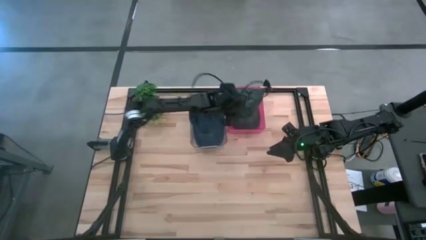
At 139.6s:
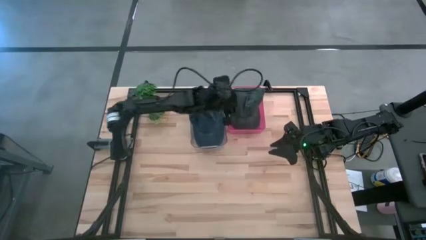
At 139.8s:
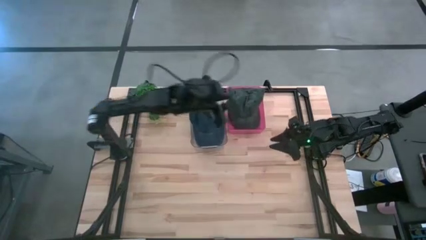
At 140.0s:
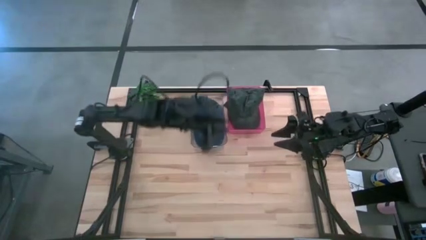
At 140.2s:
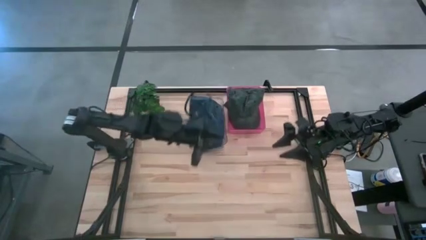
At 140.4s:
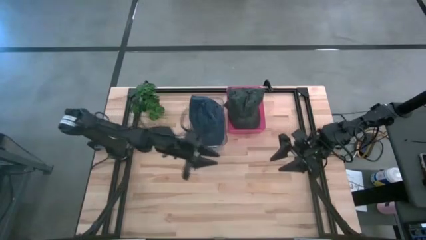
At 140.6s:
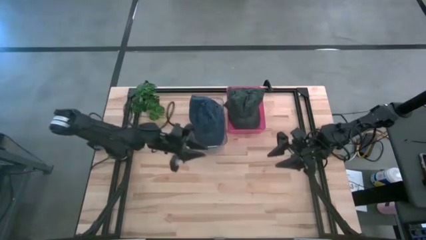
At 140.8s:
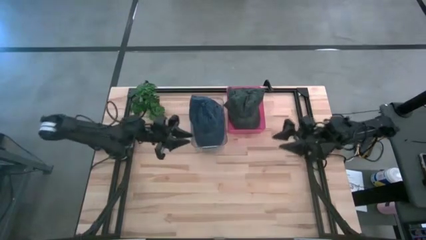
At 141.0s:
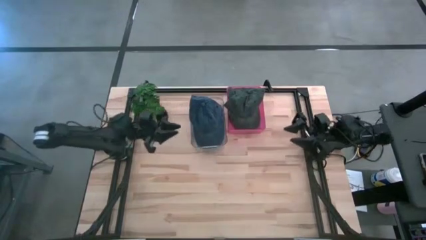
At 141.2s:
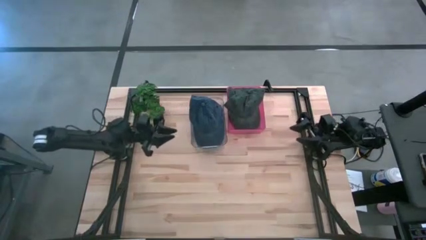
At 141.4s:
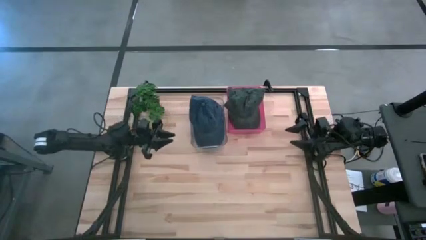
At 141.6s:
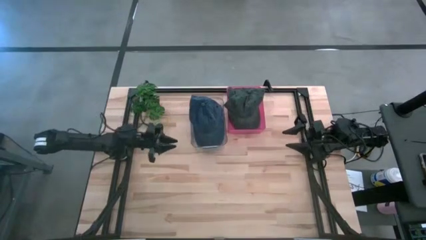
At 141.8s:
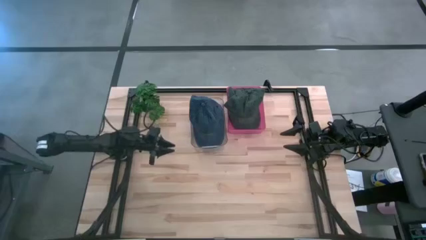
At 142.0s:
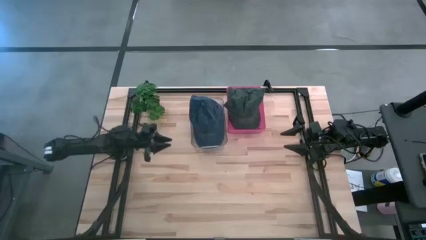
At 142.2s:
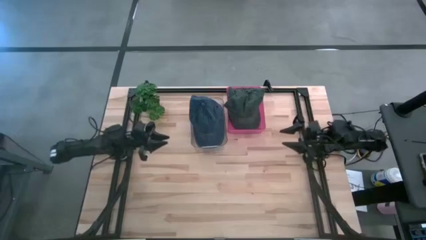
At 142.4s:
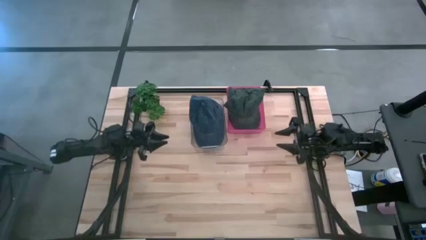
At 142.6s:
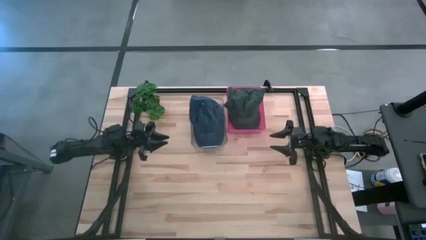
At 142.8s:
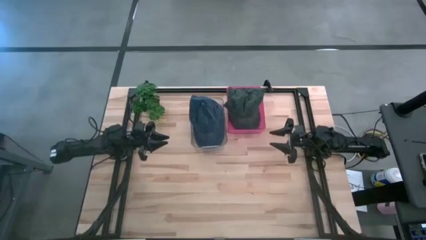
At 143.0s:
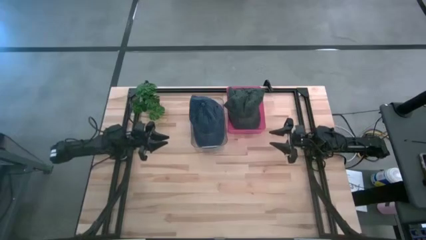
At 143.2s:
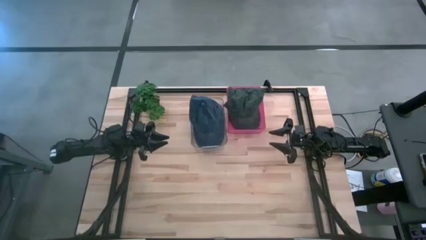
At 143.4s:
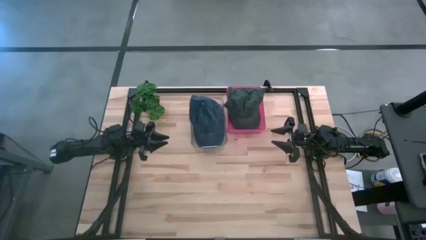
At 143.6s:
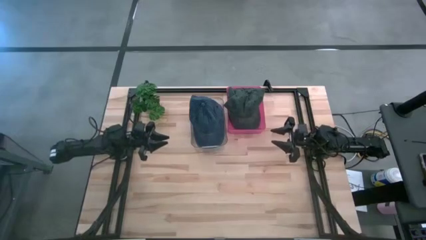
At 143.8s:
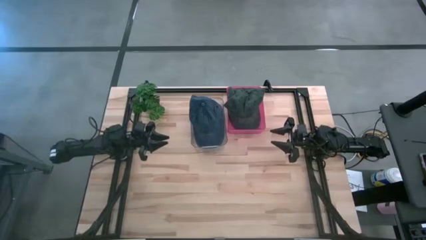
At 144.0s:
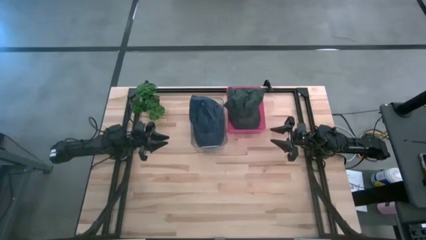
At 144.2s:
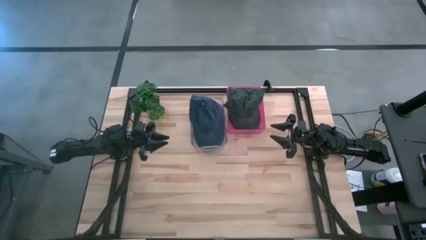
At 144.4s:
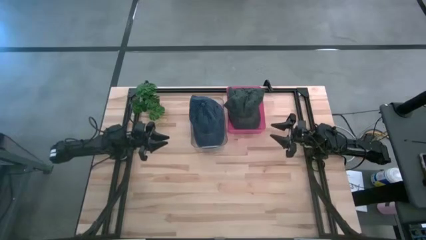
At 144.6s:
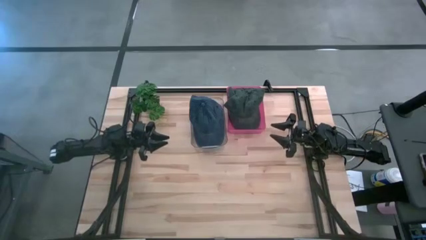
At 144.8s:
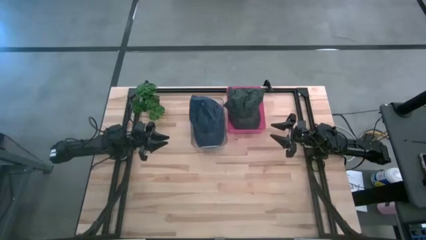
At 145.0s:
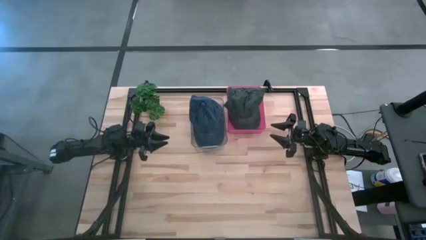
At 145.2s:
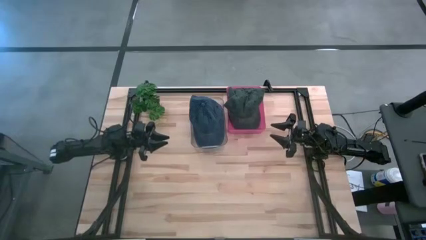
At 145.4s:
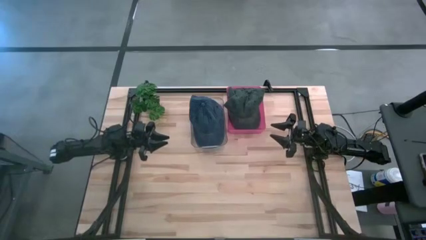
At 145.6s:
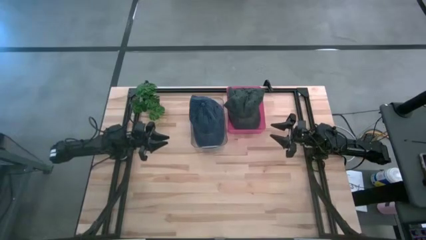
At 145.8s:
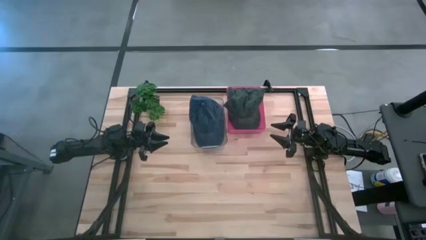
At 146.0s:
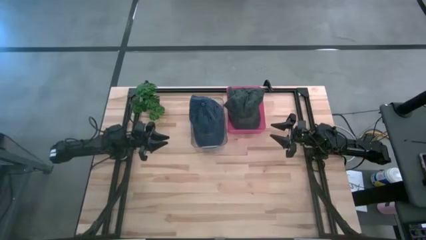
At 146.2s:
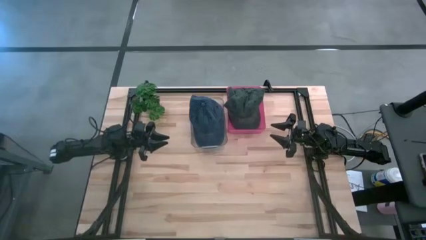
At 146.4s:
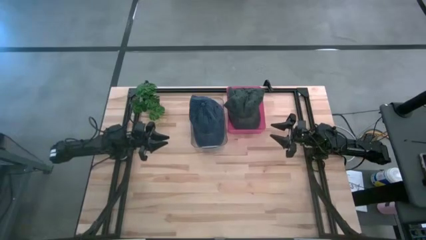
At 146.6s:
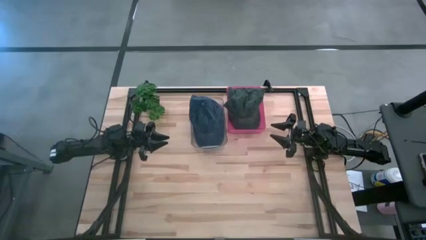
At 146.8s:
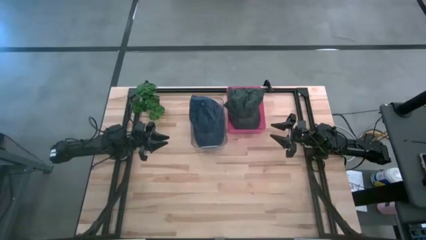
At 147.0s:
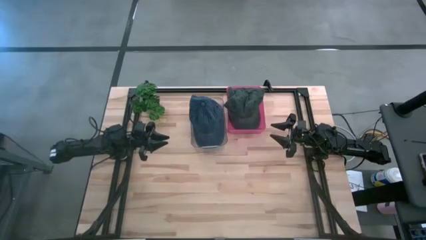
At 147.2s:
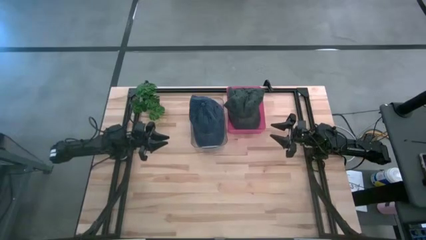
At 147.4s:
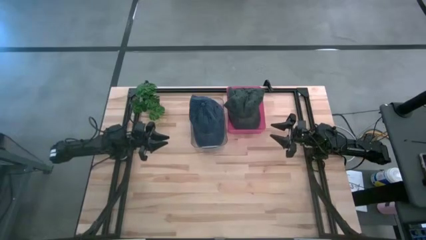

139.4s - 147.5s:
Task: Pick & Place hat
Return to home position
